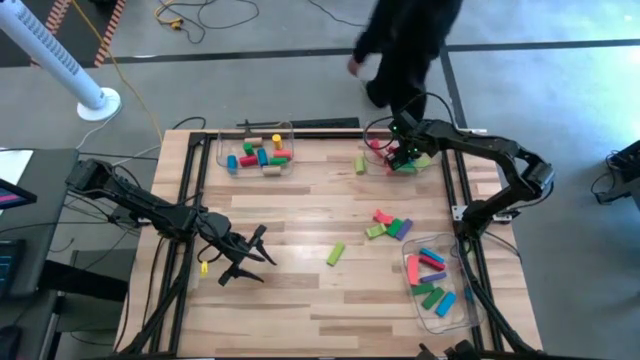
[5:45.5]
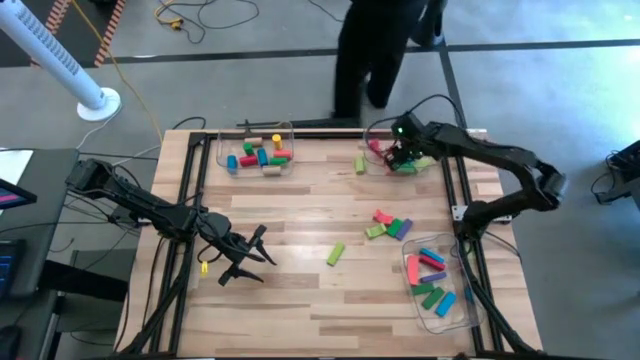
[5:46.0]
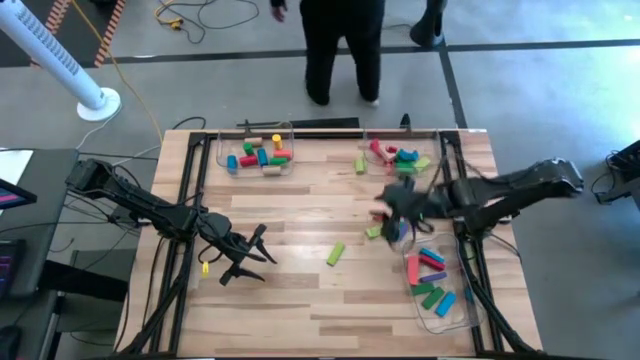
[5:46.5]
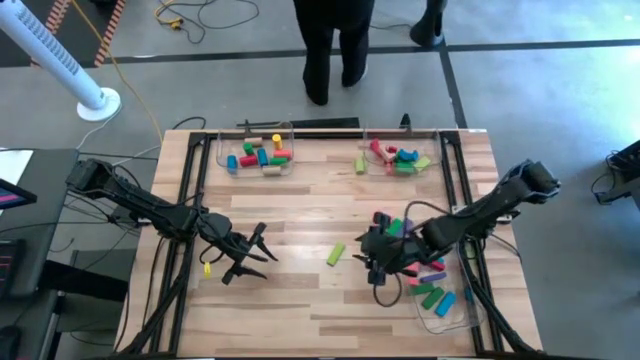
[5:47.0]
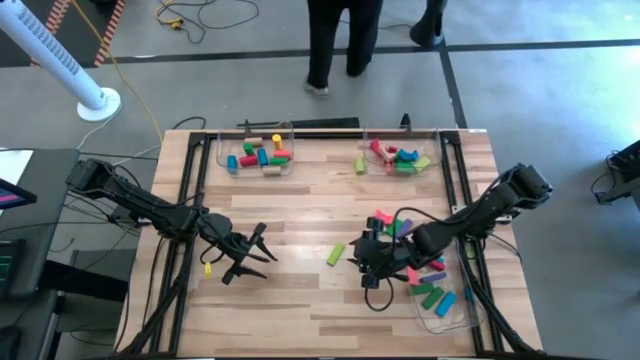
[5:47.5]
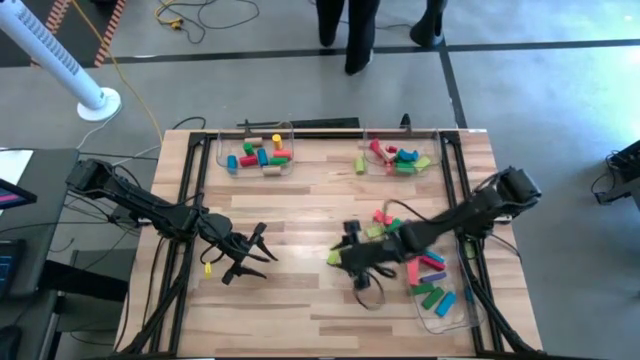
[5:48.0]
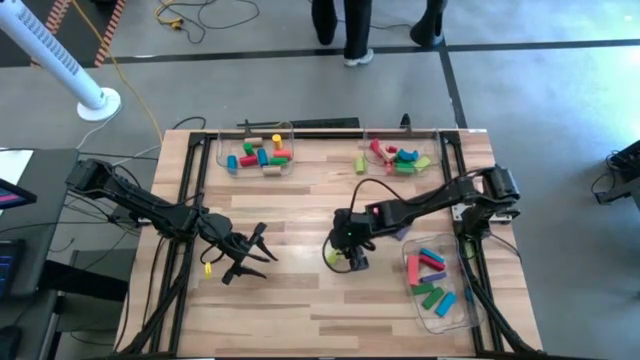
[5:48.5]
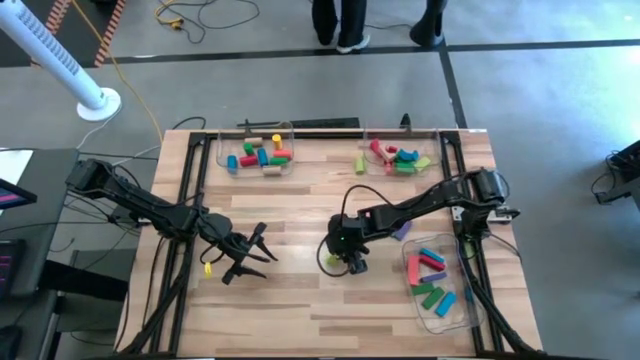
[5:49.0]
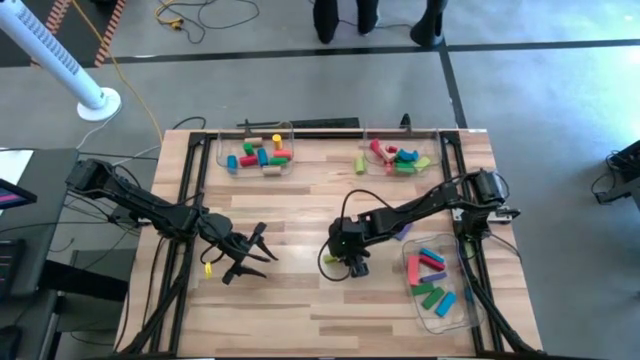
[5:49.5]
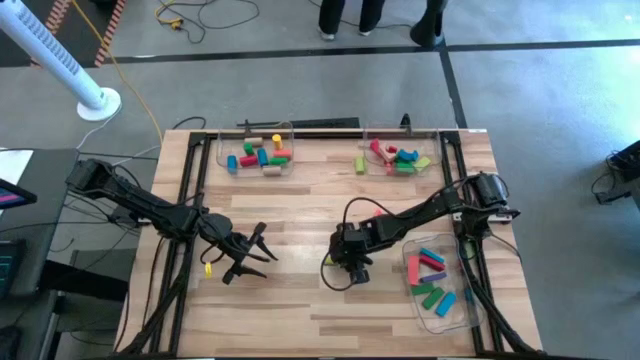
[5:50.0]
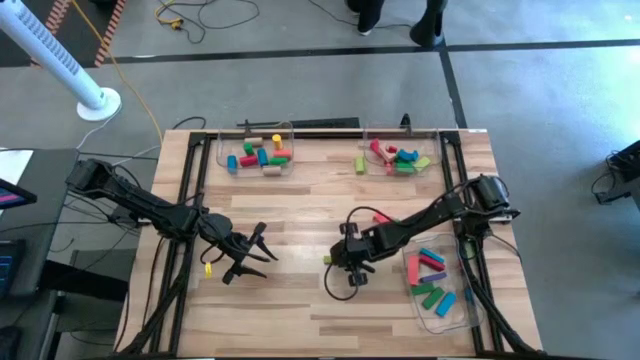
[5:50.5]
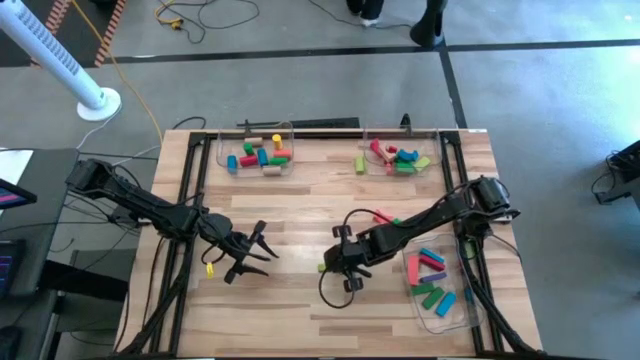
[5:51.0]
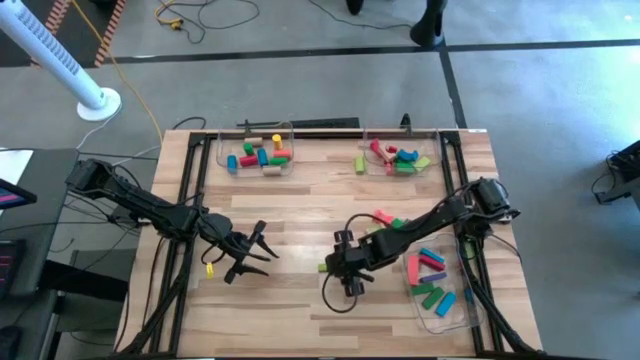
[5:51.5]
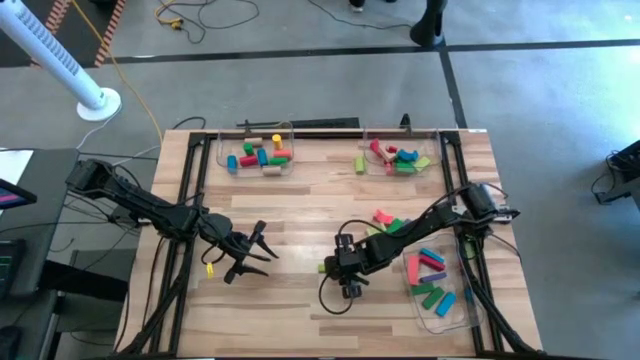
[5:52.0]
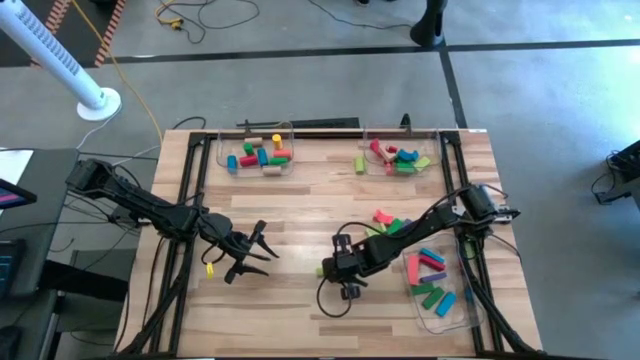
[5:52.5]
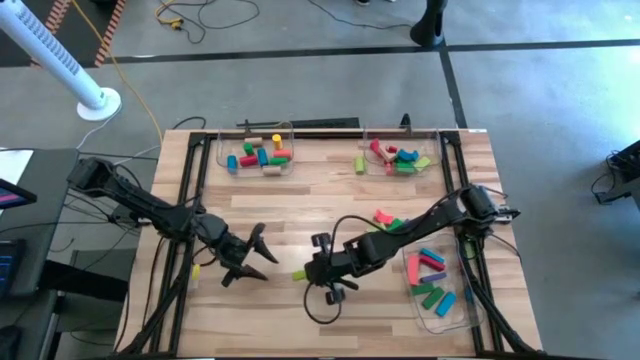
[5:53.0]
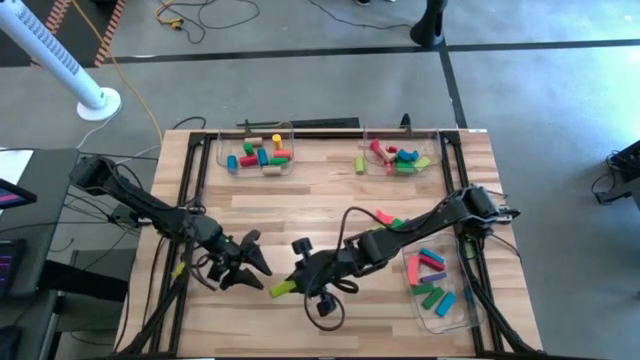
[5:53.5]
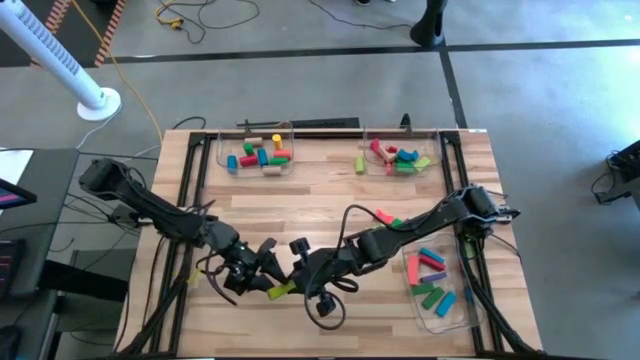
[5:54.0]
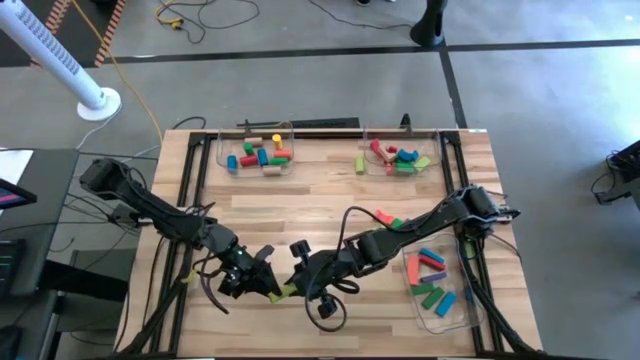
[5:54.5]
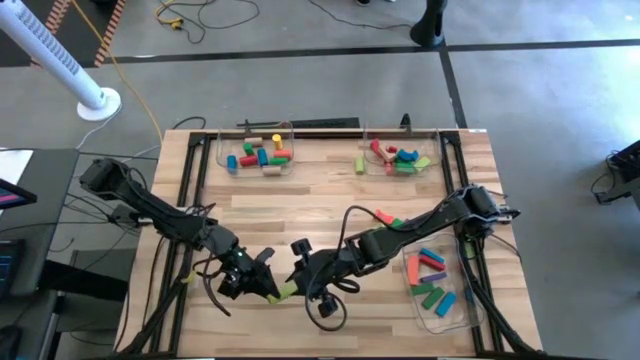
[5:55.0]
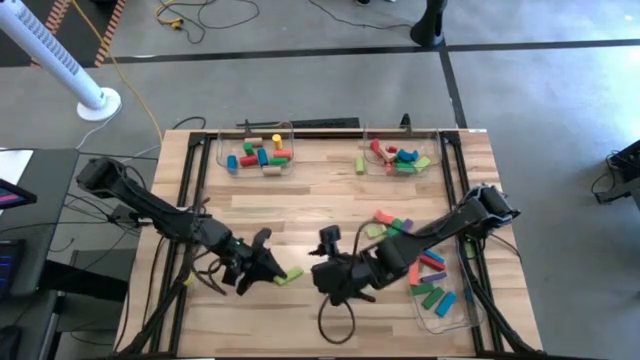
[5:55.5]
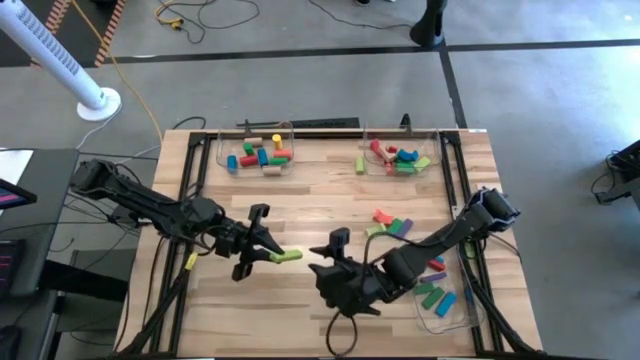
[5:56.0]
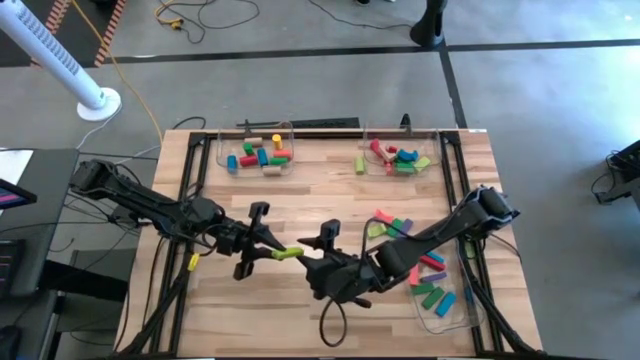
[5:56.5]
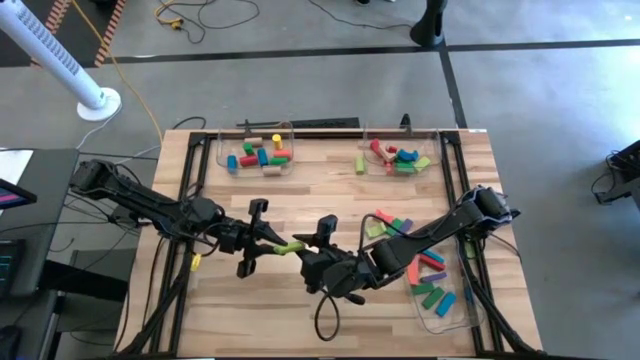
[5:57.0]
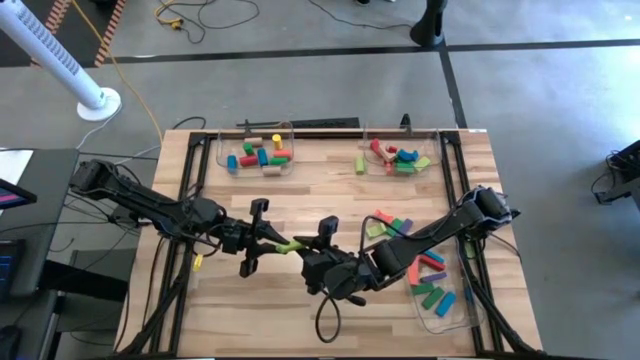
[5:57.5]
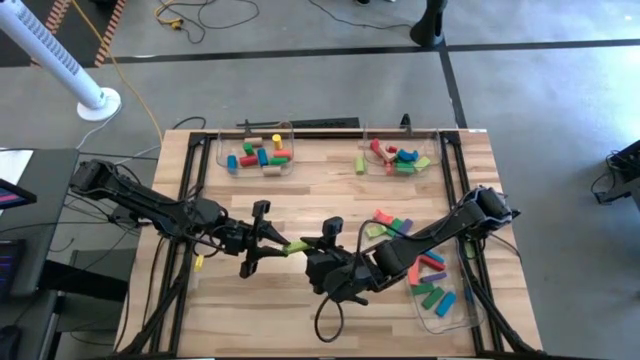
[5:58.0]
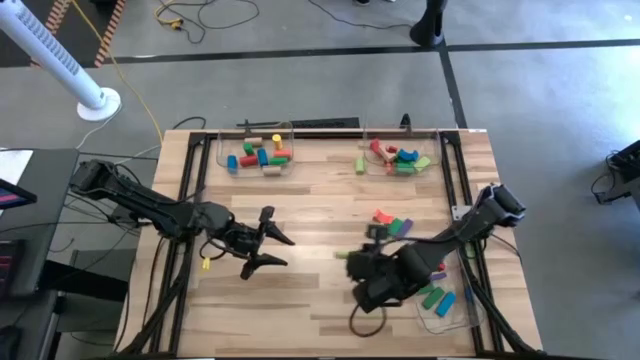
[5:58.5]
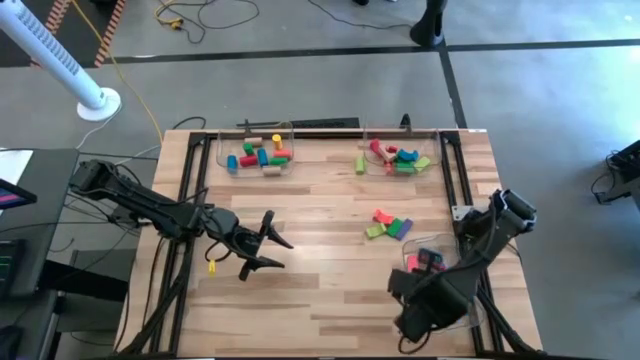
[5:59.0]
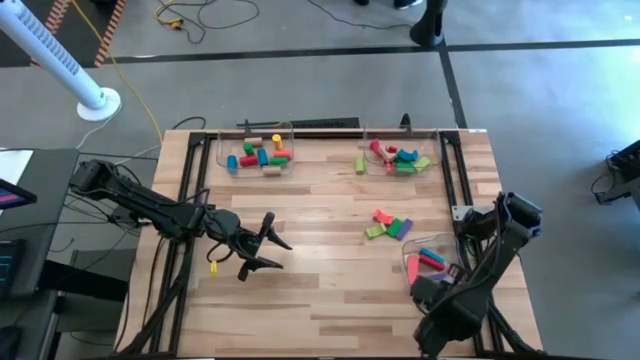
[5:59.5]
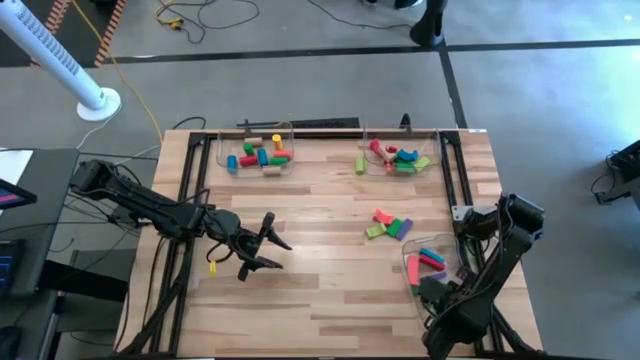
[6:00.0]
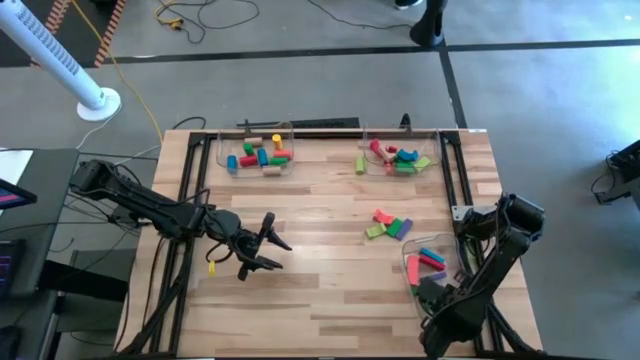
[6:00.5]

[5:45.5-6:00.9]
Task: Sort blocks by size
Put the light green rectangular block into the bottom transparent bin

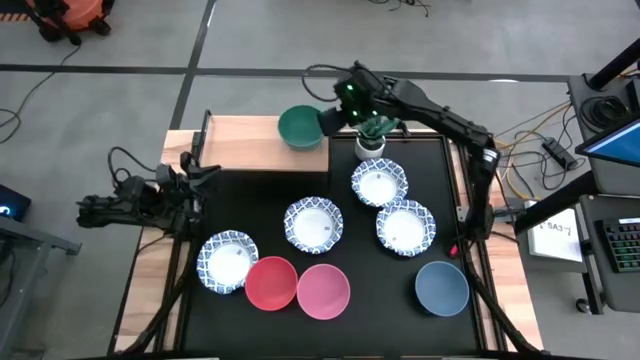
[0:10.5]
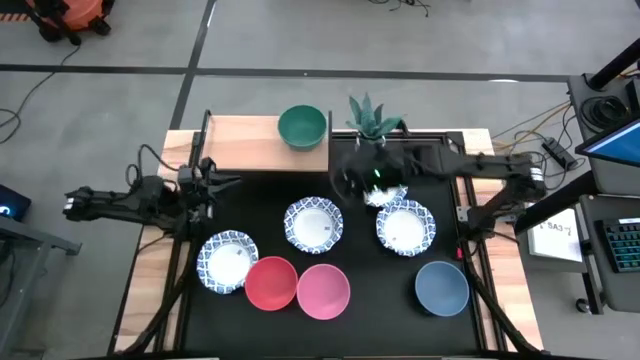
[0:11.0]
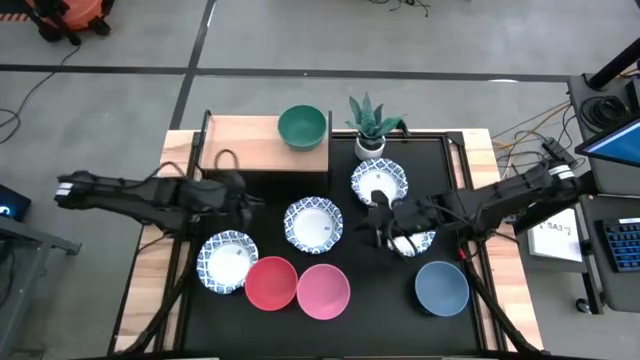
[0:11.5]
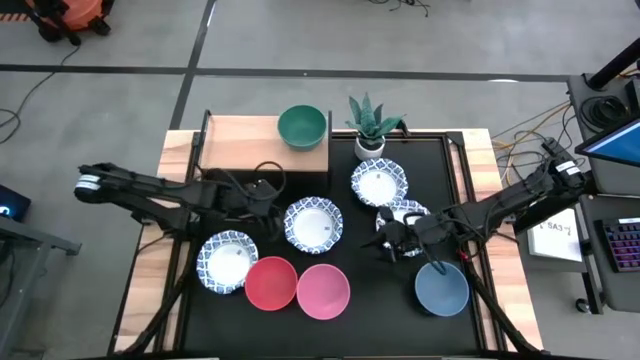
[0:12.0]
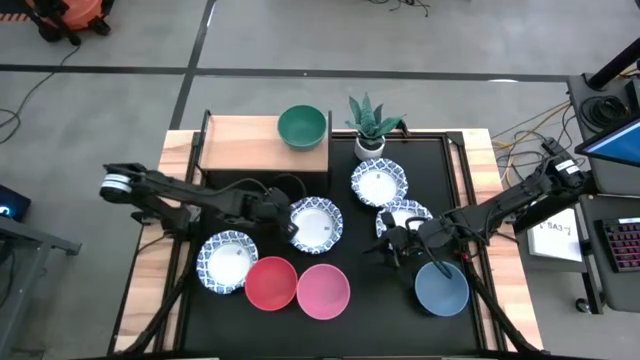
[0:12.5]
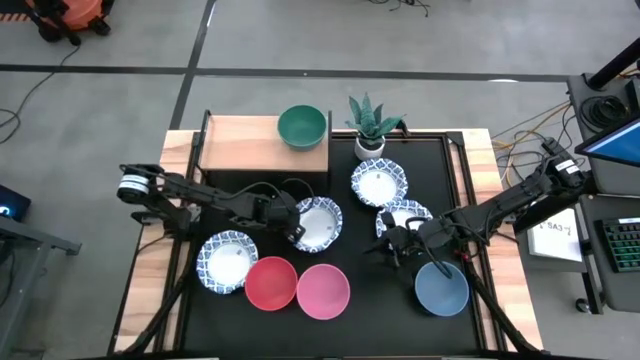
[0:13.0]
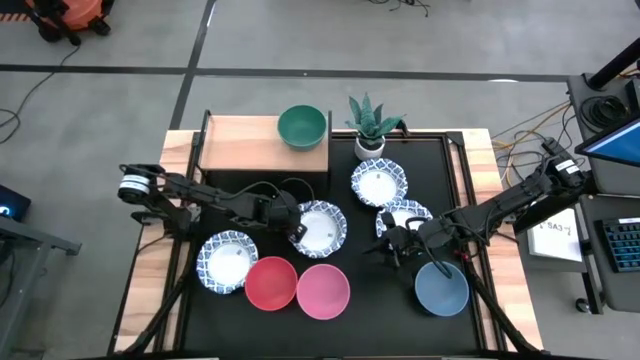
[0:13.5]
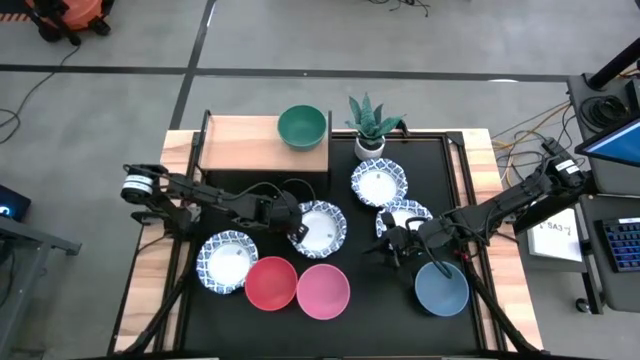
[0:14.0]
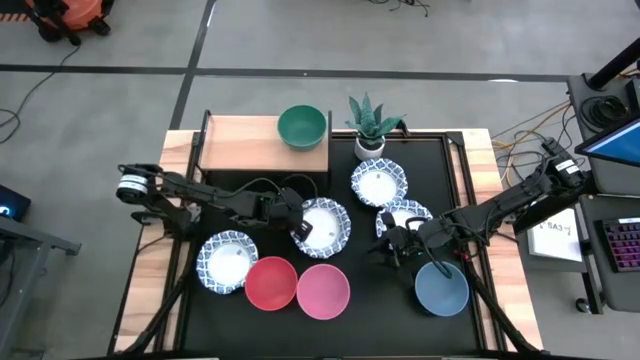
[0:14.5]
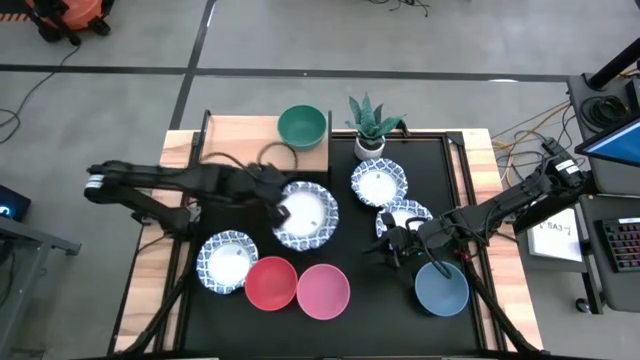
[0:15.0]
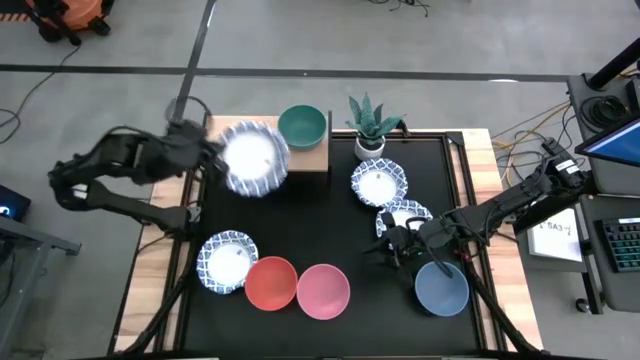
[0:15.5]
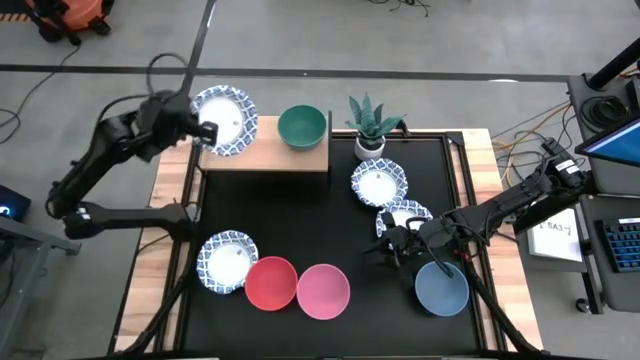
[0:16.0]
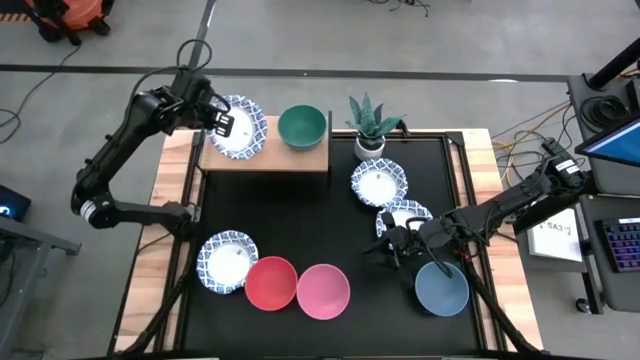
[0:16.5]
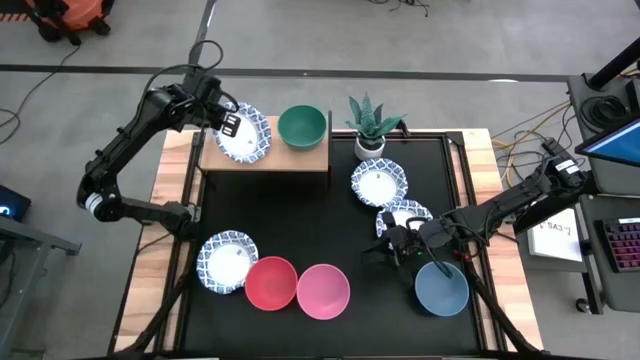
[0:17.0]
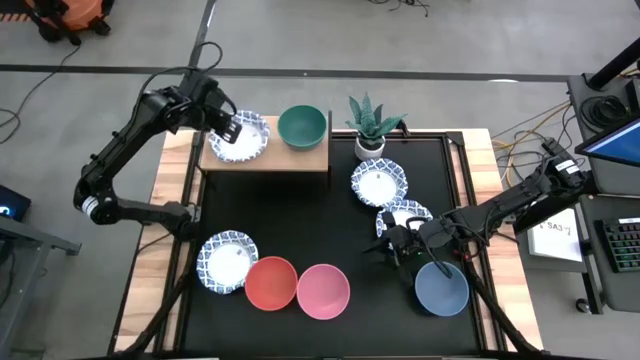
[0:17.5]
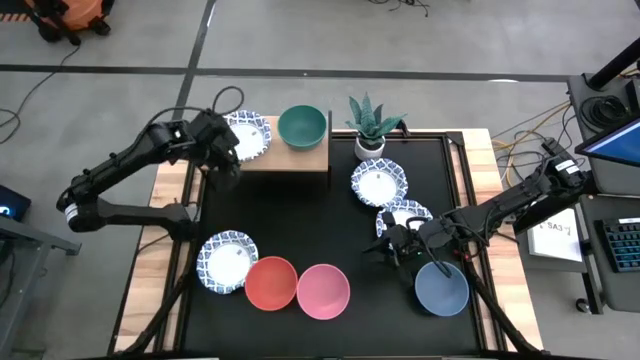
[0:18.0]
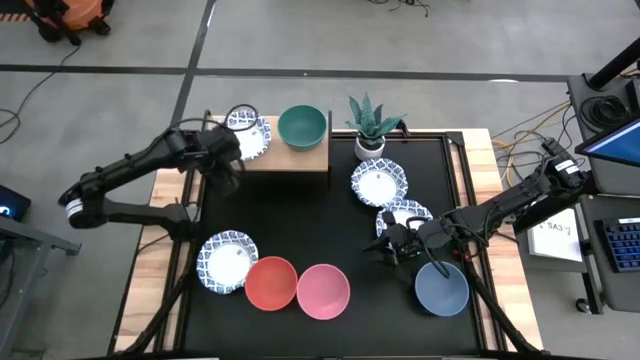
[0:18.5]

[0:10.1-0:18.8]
Task: Place and stack bowls onto a shelf
Put the white bowl on the shelf
